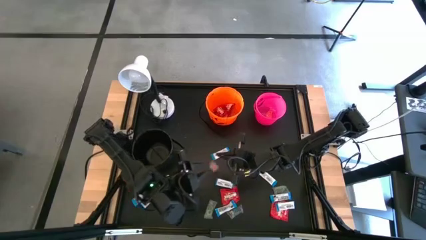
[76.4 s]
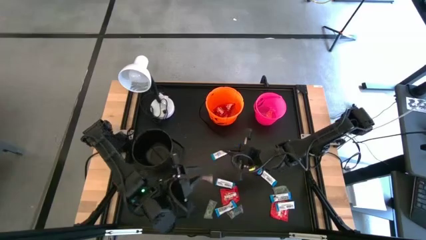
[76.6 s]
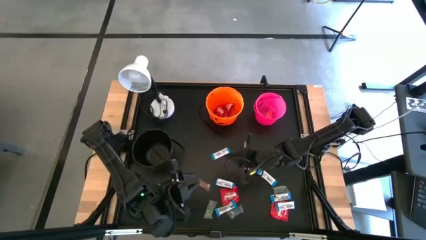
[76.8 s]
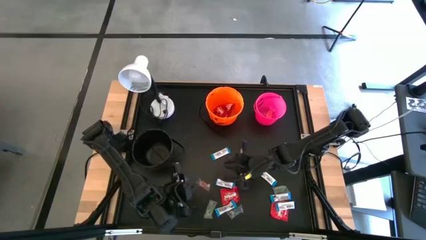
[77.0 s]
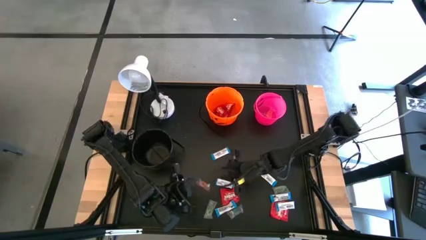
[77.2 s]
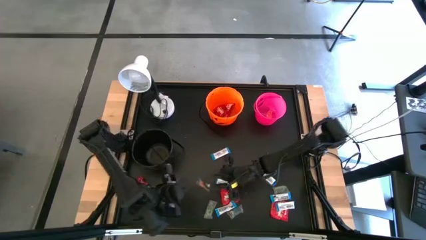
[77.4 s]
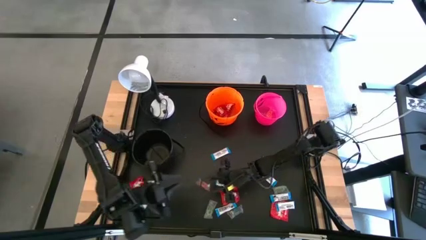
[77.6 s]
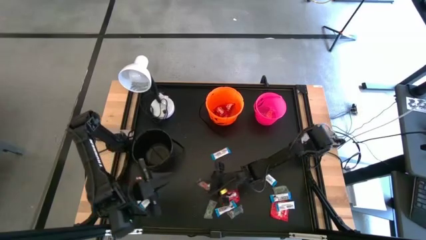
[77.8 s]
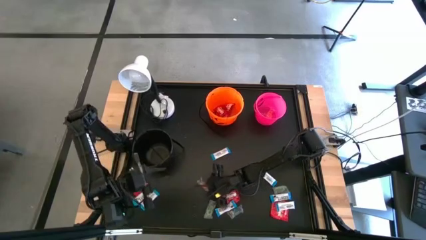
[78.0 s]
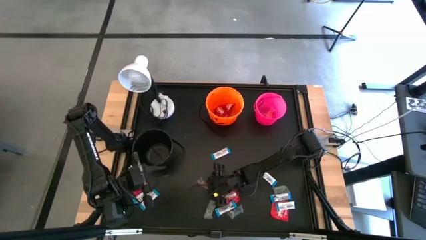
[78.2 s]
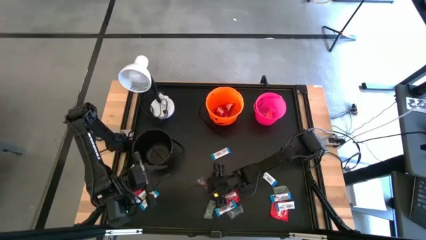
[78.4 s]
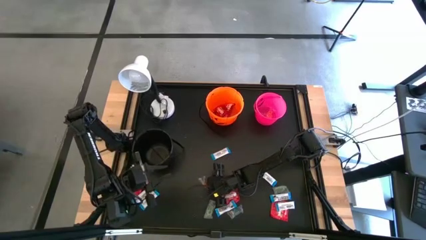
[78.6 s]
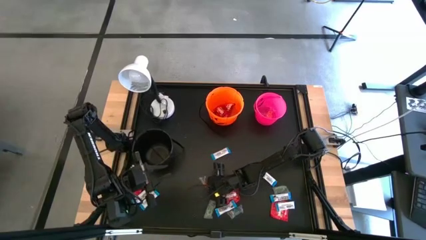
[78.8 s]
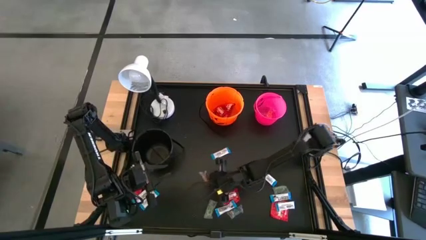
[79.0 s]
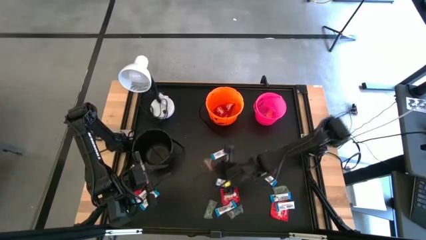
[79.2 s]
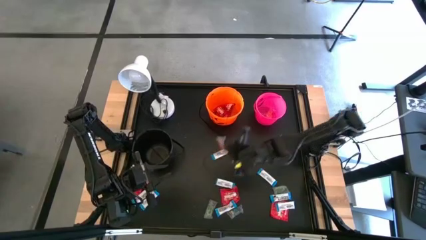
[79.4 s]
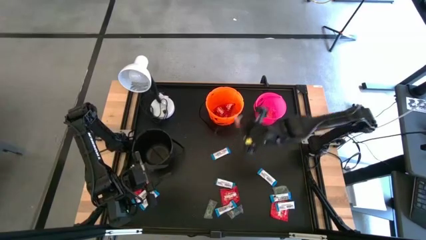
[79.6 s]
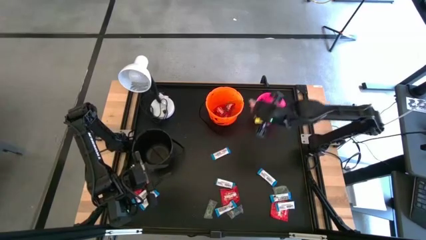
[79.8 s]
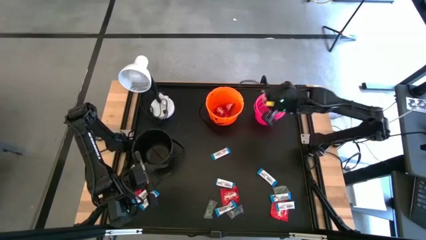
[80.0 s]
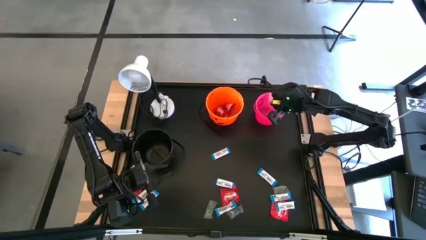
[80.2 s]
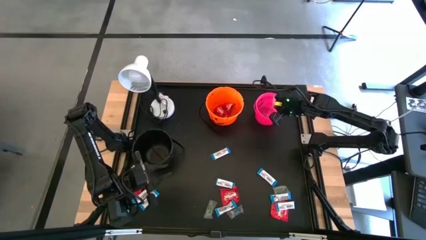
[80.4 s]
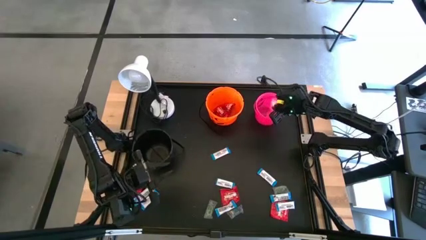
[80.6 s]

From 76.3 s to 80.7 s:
Task: Sort candy
Put the orange candy into the pink bucket

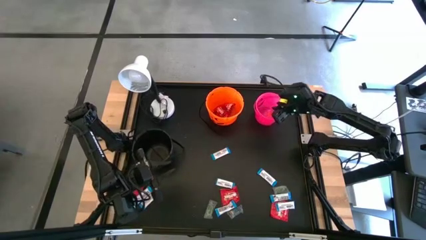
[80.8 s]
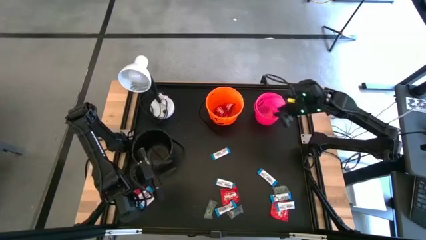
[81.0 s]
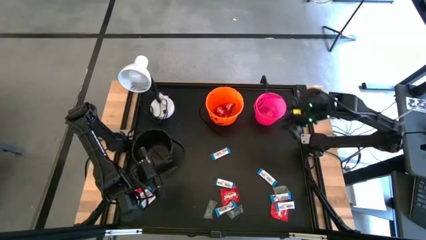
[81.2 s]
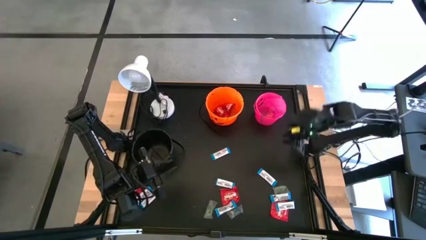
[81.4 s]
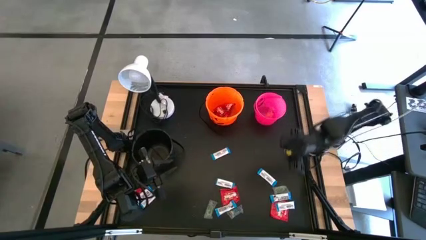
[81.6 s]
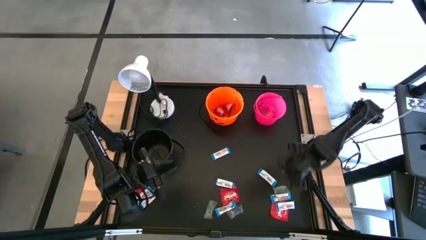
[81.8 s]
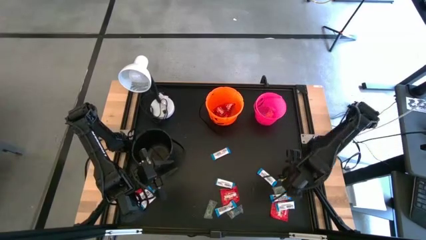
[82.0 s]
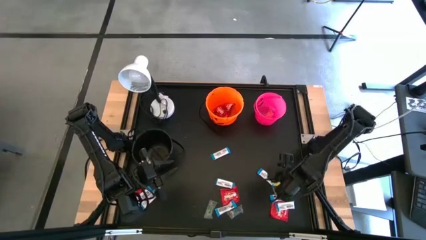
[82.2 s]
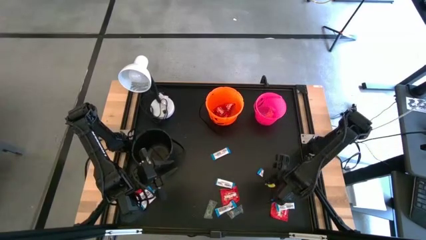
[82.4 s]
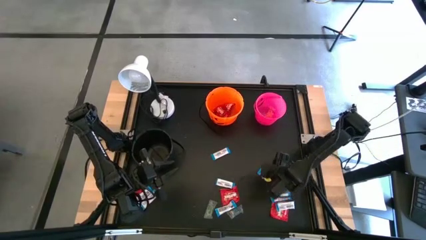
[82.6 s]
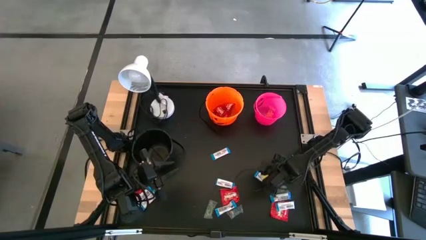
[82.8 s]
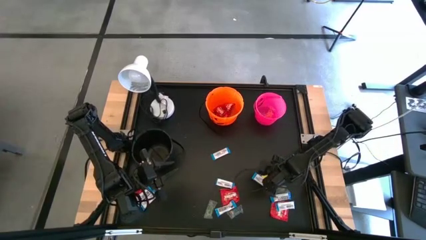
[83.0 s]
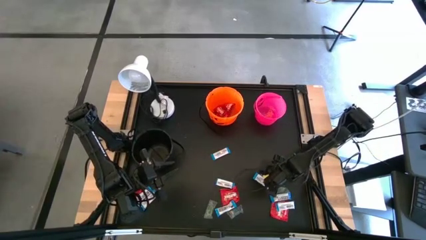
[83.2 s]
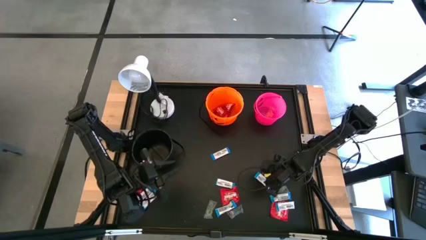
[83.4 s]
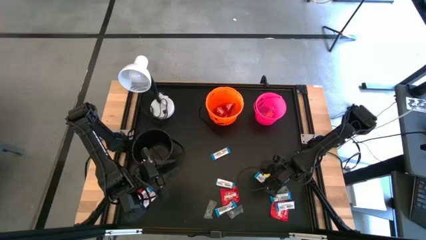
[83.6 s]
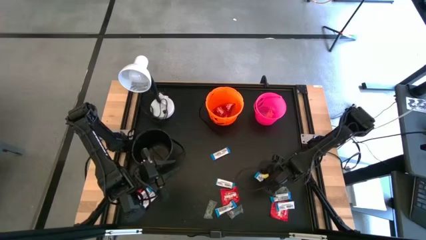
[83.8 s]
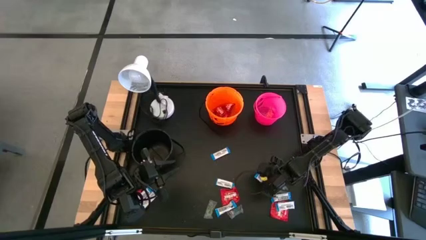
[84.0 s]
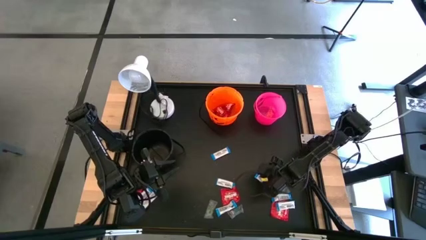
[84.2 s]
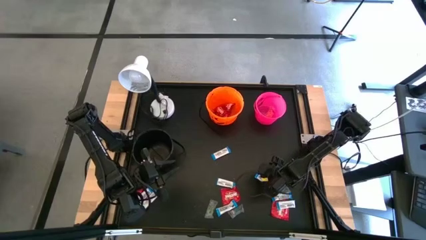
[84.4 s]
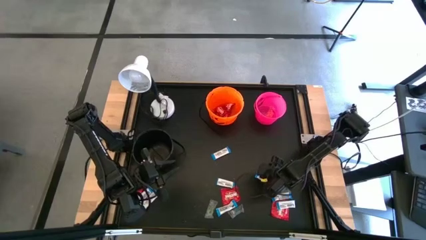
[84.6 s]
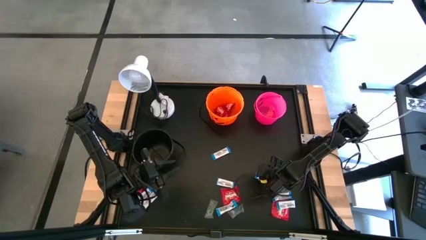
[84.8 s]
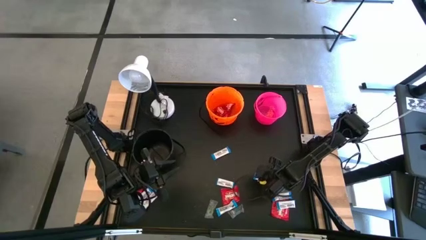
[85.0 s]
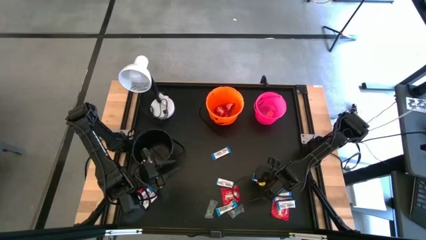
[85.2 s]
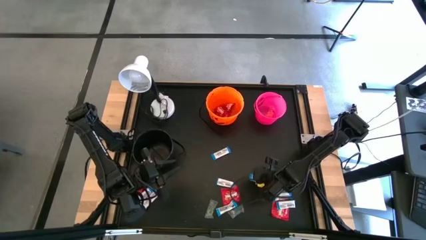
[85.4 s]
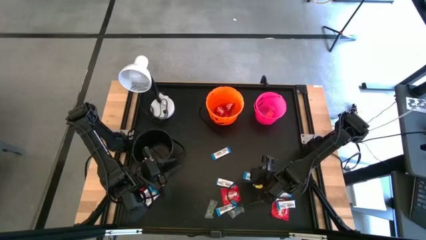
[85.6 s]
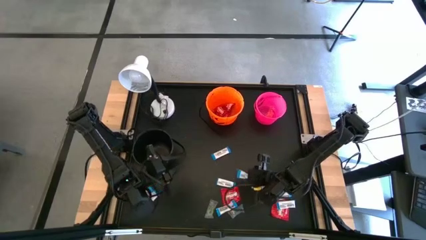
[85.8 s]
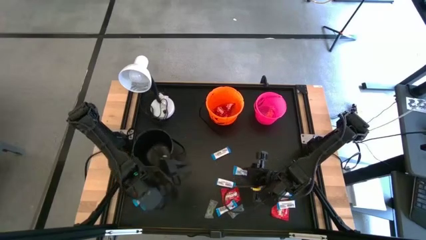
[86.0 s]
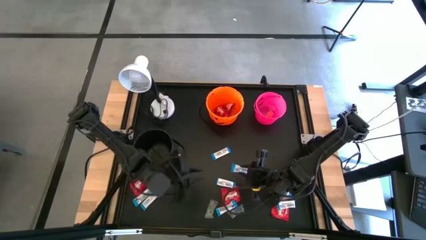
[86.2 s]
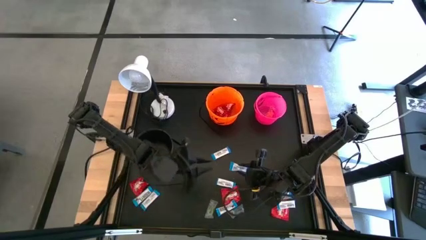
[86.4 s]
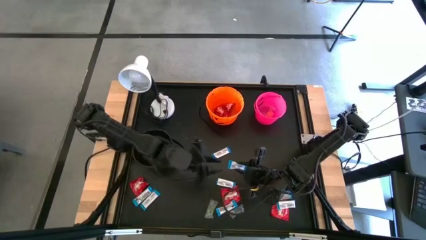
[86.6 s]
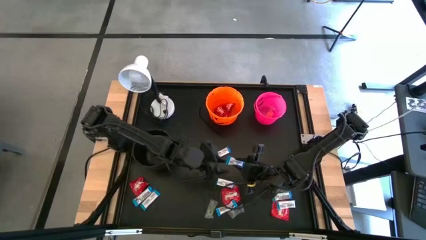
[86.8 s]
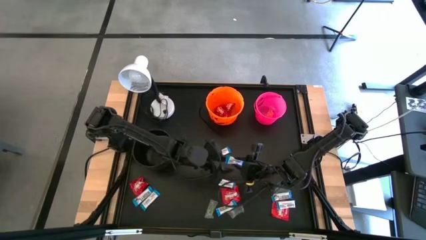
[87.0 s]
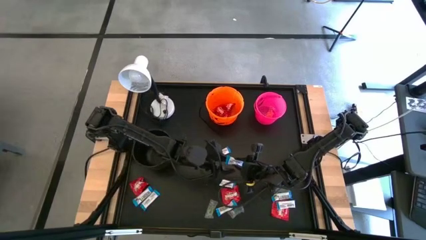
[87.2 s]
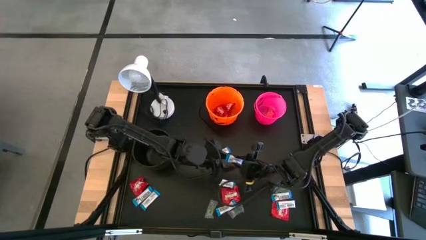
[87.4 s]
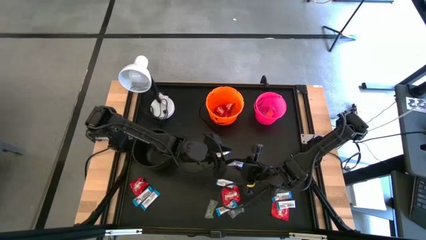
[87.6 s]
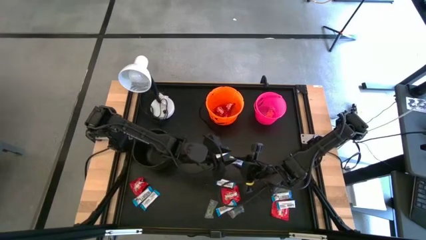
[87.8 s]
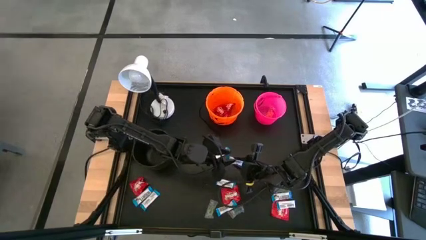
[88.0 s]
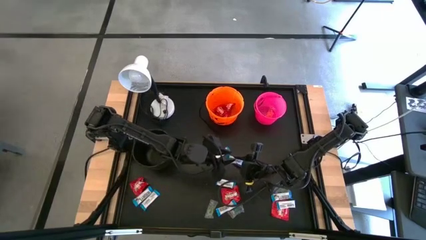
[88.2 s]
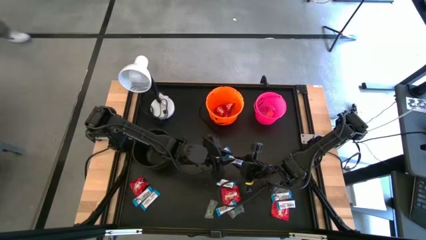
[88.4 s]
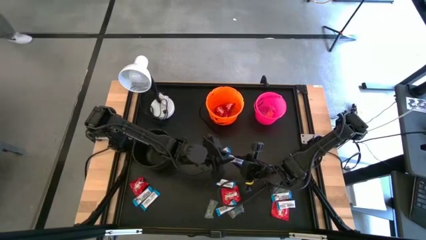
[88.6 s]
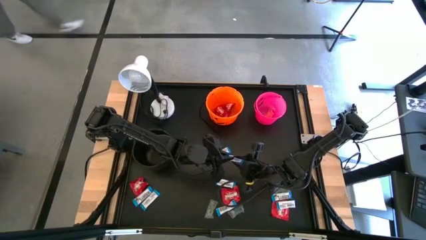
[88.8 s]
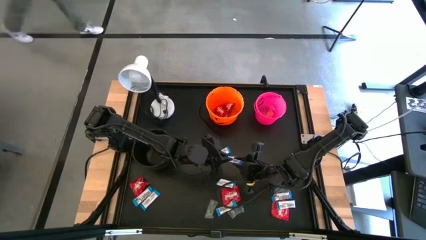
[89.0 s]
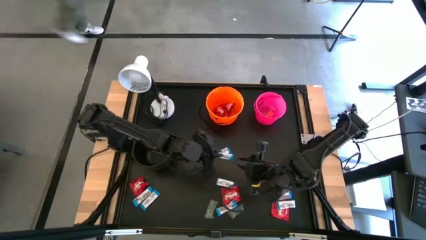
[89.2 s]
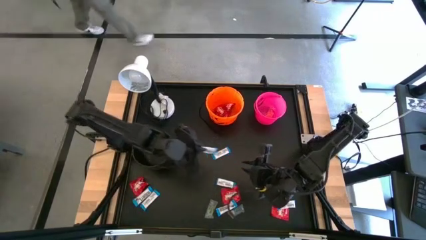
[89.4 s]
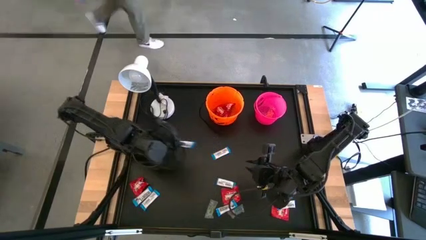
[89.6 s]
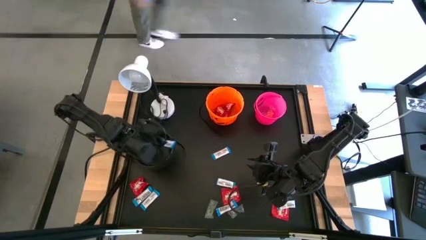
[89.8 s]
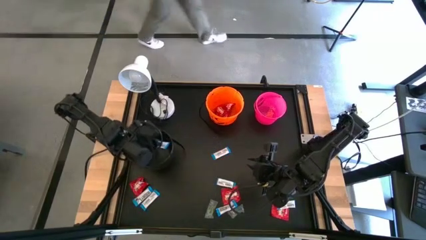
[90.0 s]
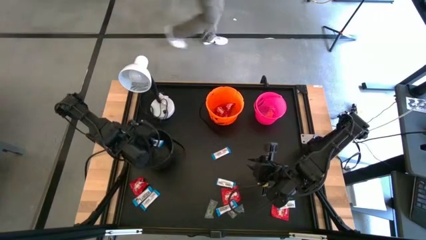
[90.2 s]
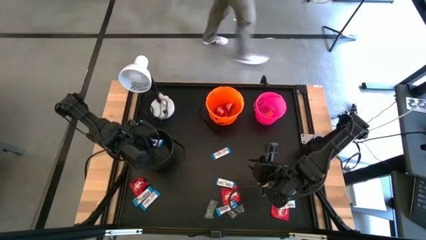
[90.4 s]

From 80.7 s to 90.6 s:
Put the white candy into the black bucket

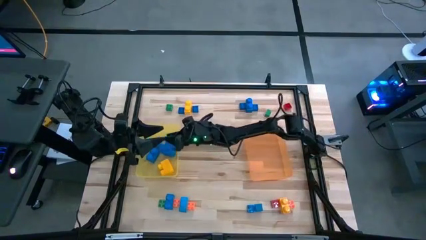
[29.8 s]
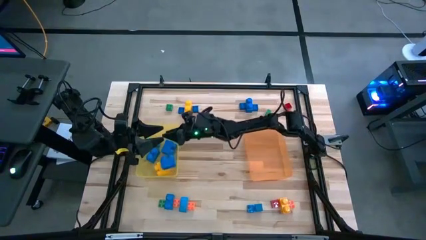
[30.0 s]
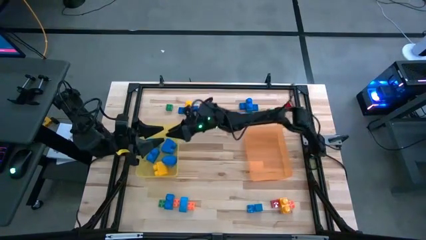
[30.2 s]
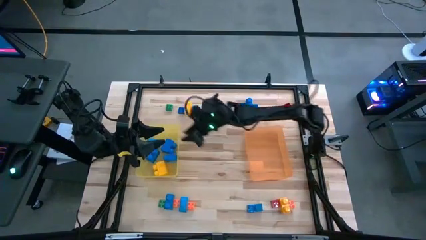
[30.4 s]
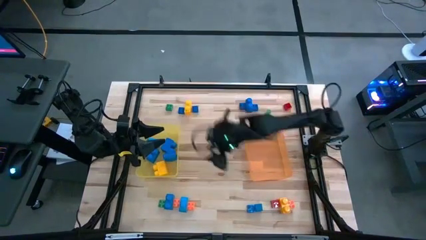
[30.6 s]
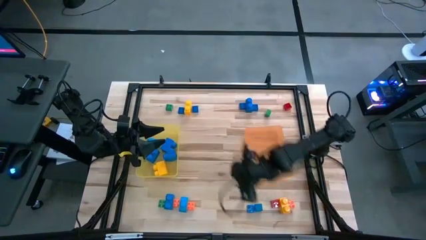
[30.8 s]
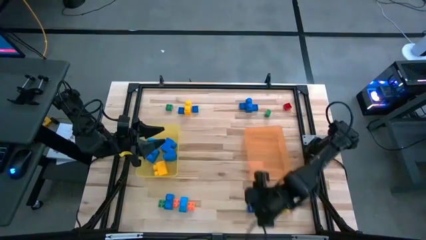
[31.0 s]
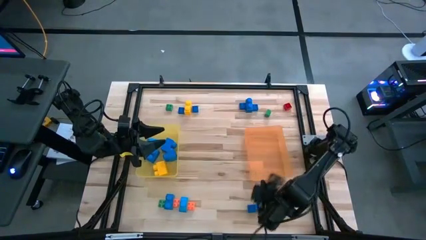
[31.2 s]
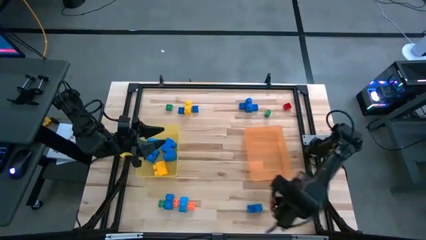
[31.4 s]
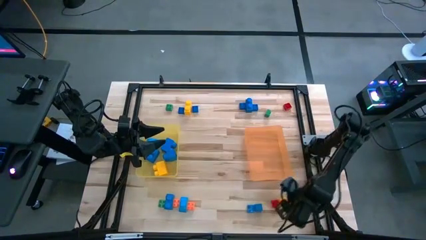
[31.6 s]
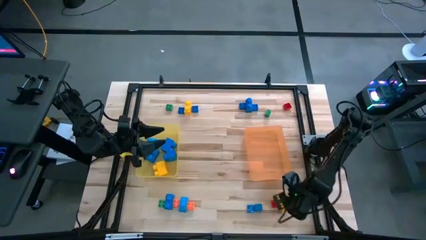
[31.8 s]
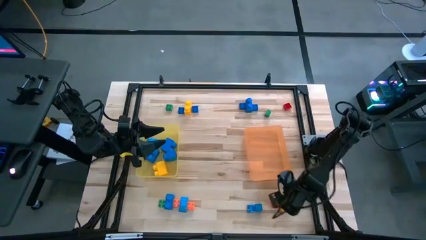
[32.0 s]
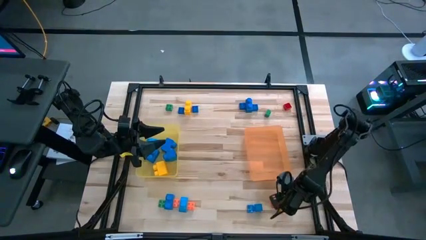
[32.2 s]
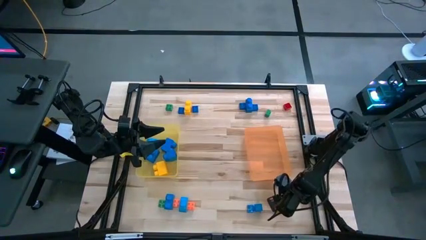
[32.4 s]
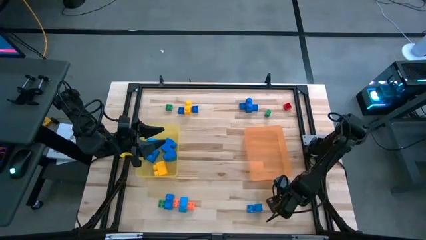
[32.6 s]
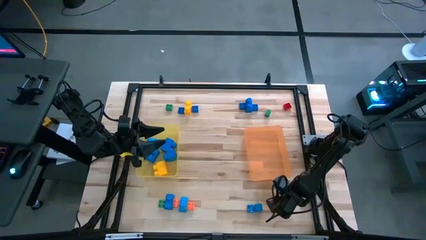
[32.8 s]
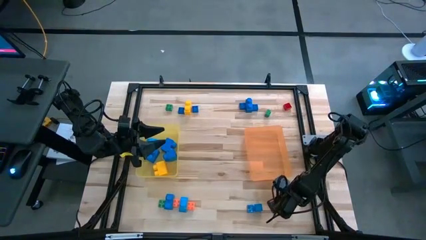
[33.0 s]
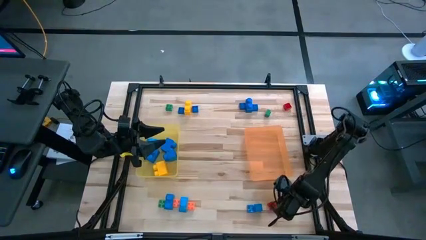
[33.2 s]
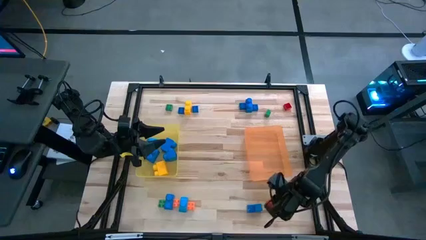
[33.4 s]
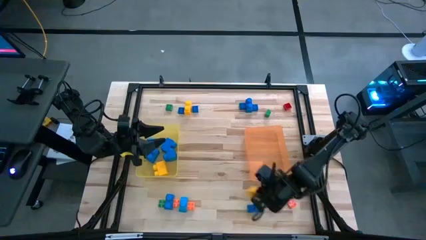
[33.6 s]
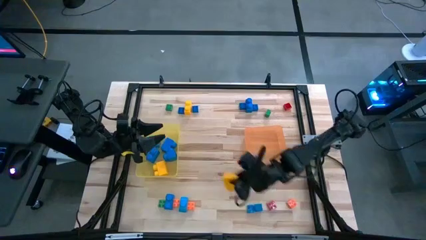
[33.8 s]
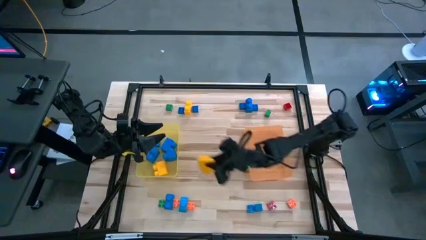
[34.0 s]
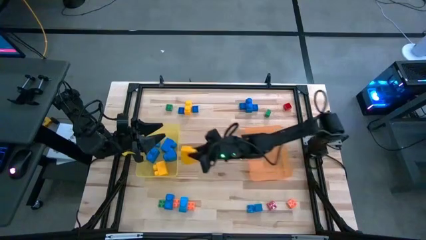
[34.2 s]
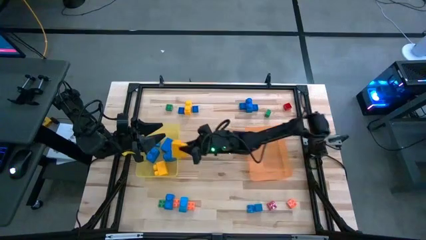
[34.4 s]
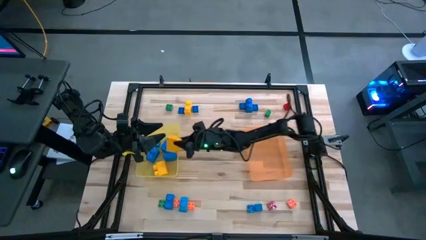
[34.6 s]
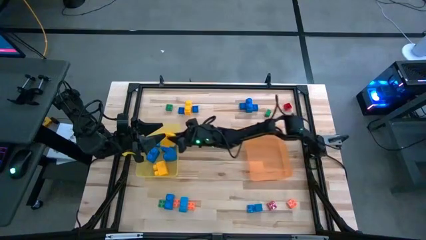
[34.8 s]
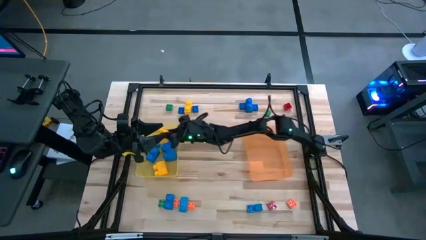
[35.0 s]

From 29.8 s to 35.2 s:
Task: Sort blocks by size
Put the large yellow game piece into the yellow bin
